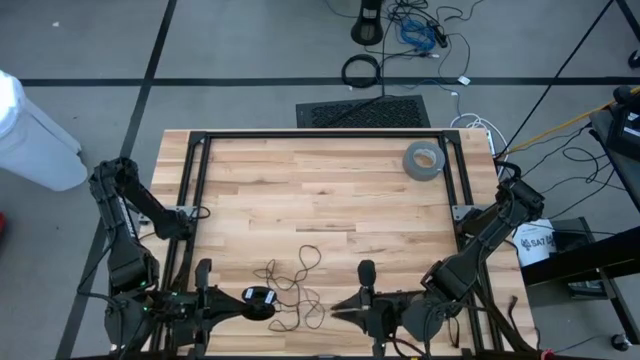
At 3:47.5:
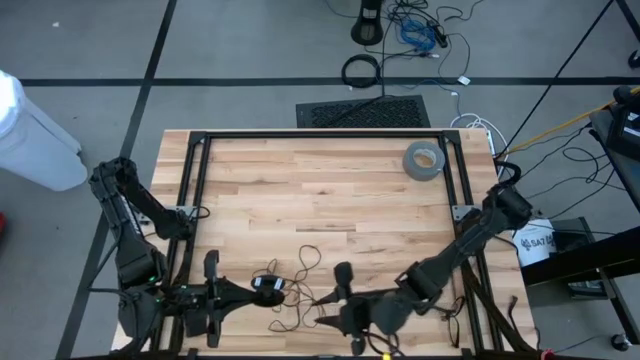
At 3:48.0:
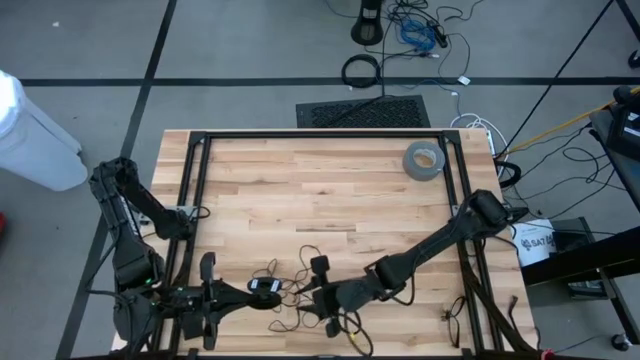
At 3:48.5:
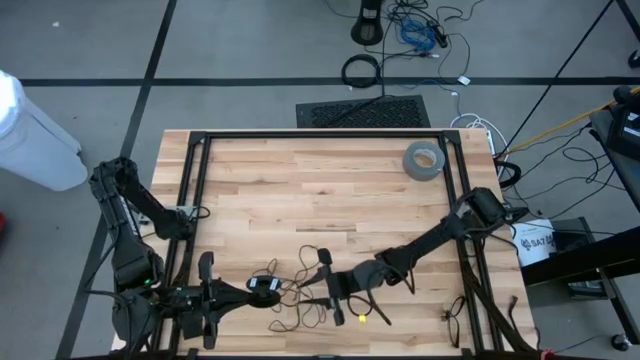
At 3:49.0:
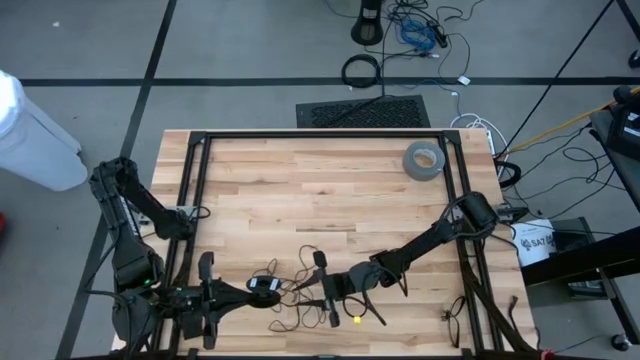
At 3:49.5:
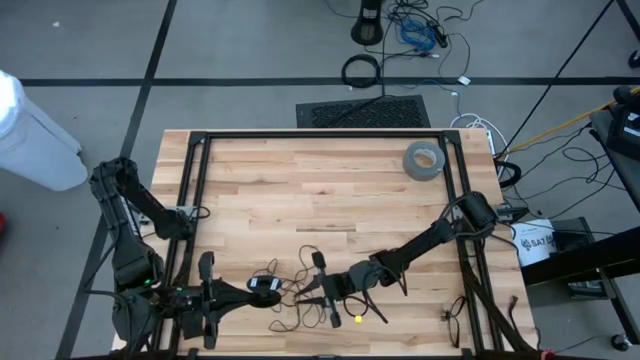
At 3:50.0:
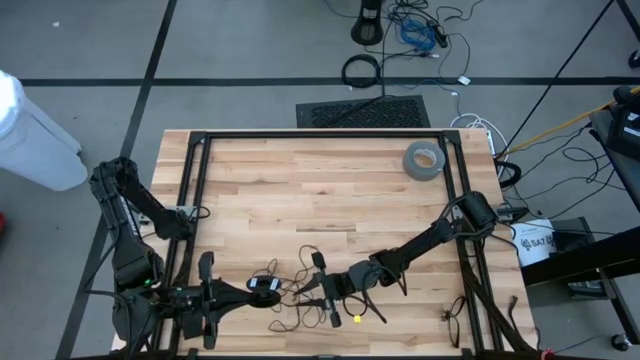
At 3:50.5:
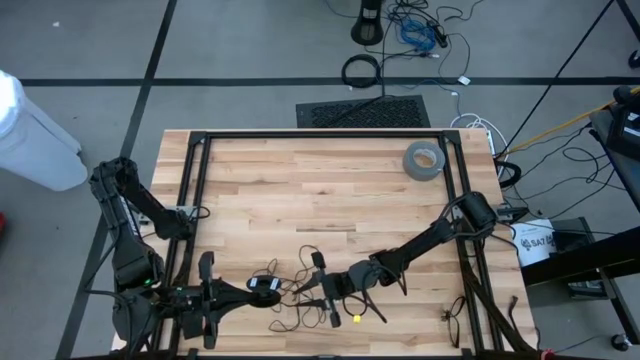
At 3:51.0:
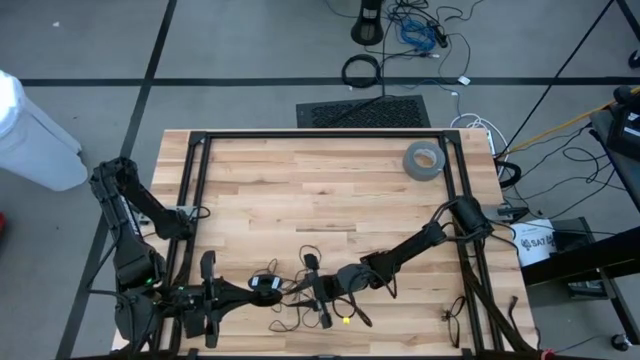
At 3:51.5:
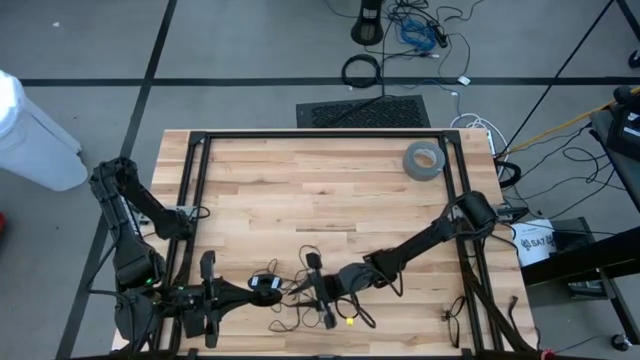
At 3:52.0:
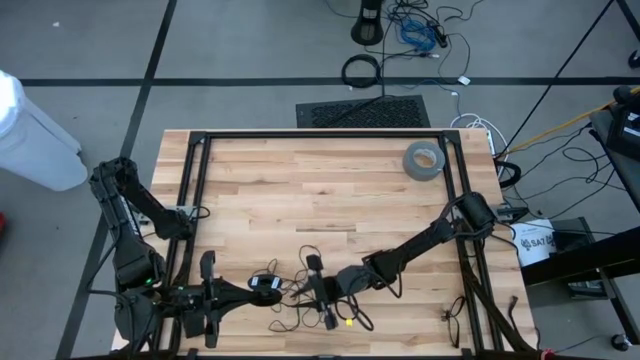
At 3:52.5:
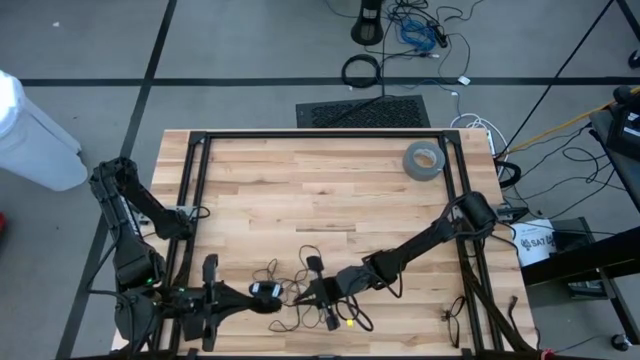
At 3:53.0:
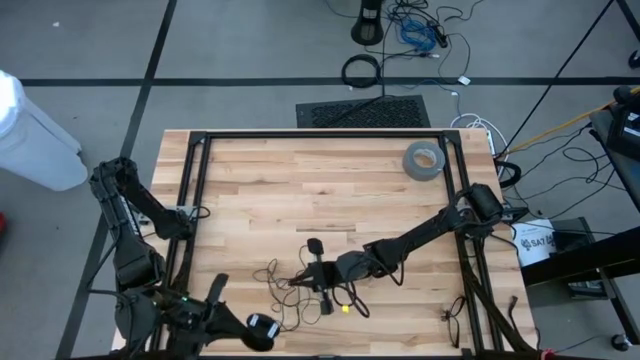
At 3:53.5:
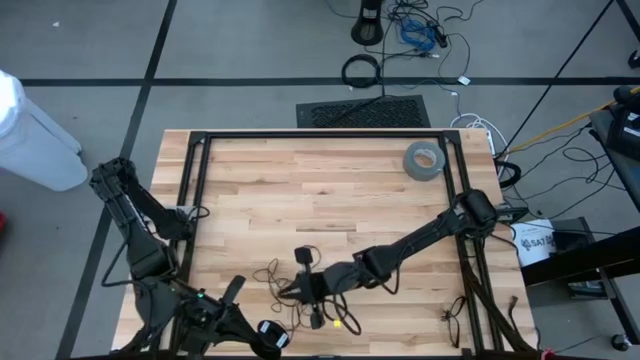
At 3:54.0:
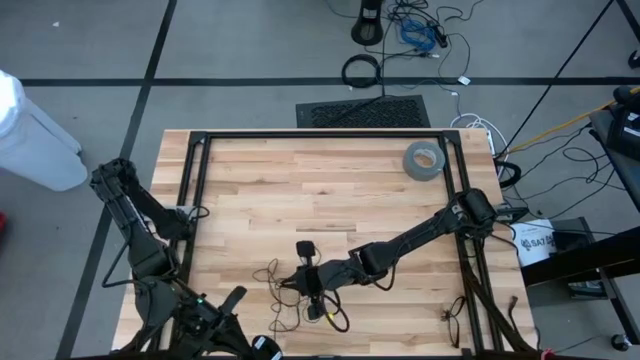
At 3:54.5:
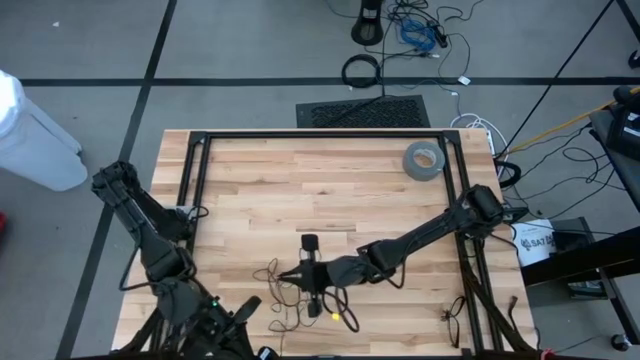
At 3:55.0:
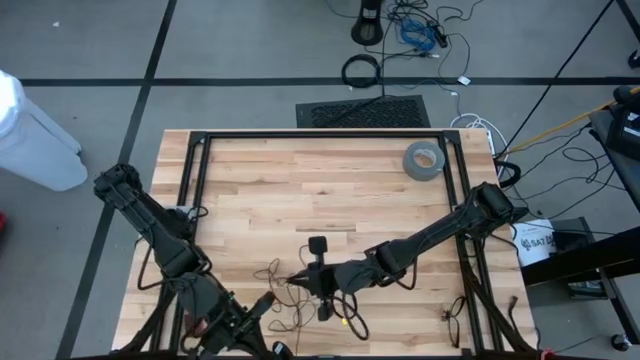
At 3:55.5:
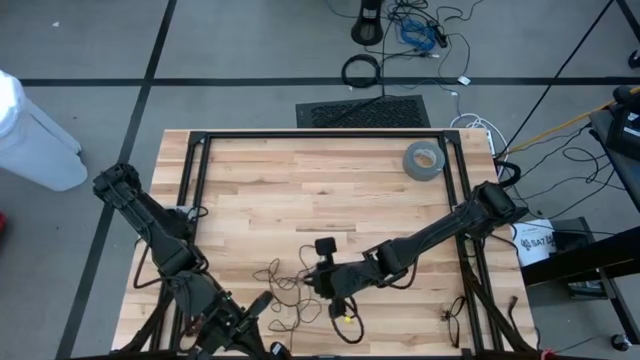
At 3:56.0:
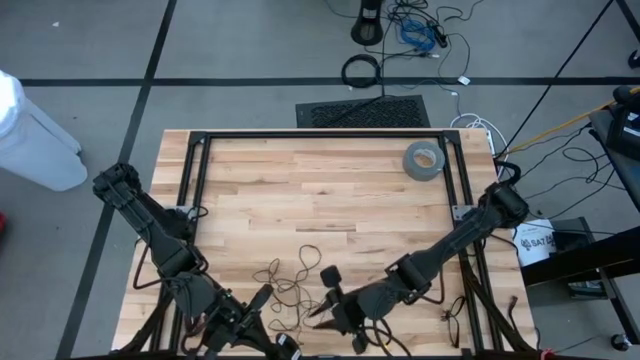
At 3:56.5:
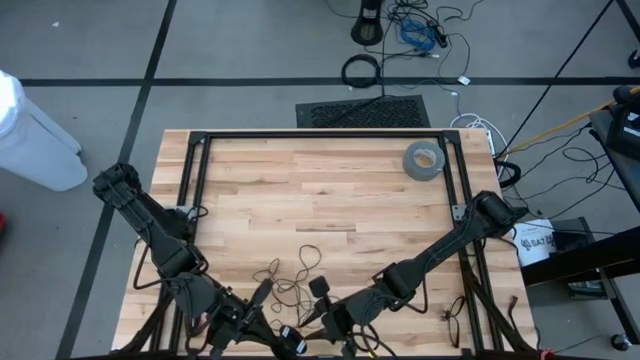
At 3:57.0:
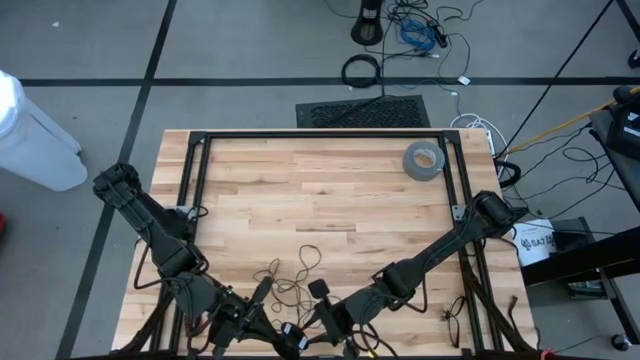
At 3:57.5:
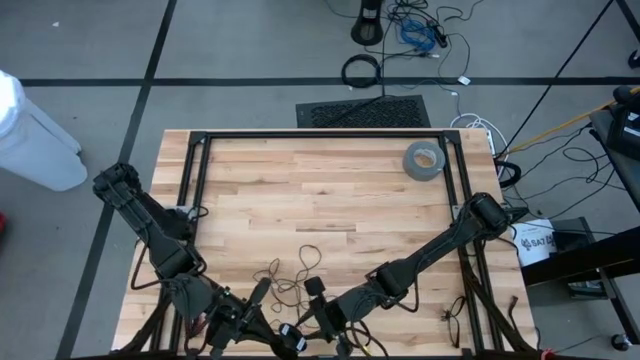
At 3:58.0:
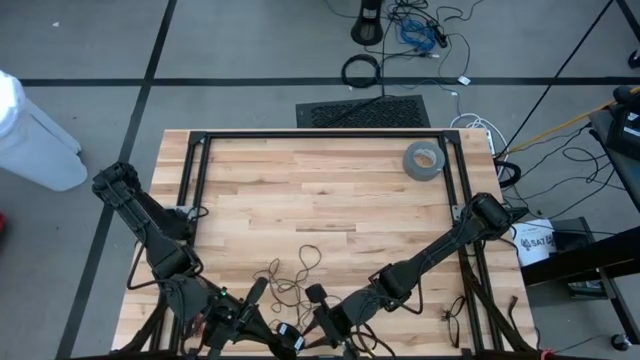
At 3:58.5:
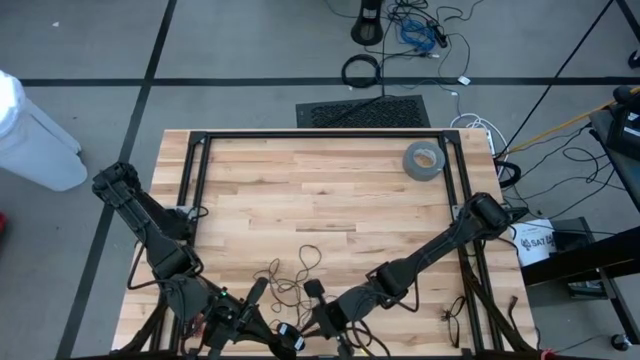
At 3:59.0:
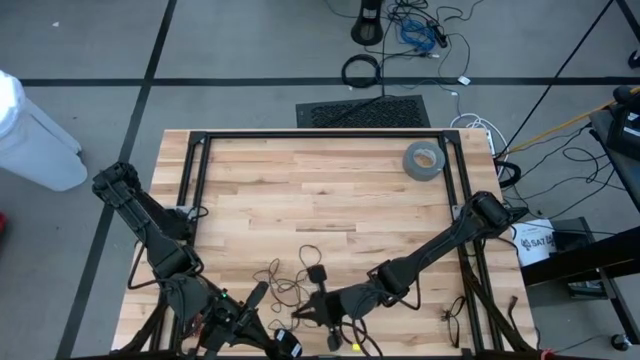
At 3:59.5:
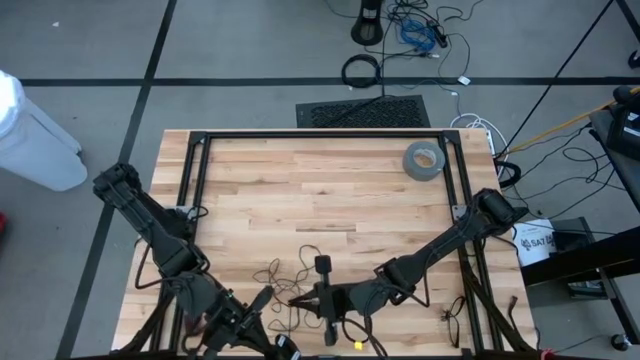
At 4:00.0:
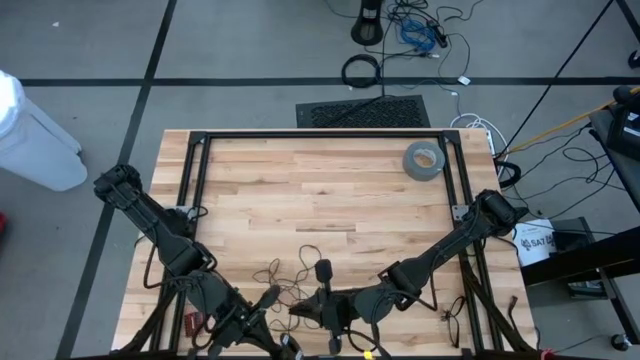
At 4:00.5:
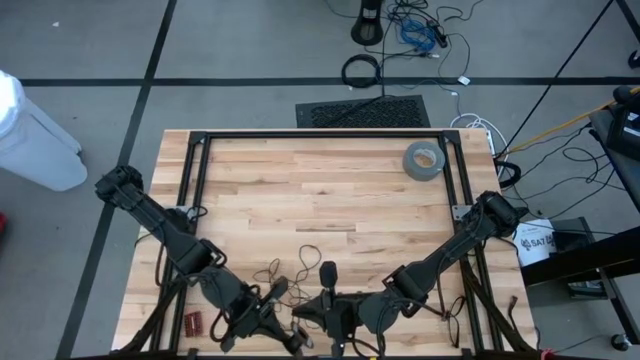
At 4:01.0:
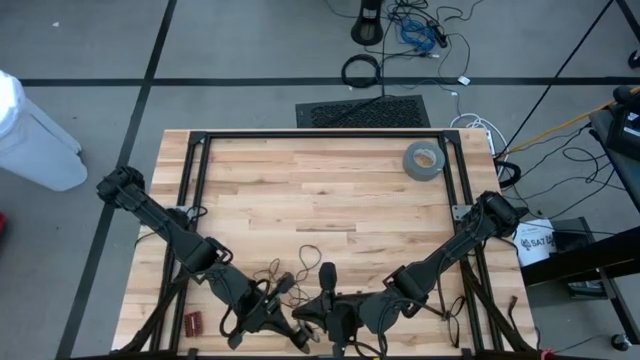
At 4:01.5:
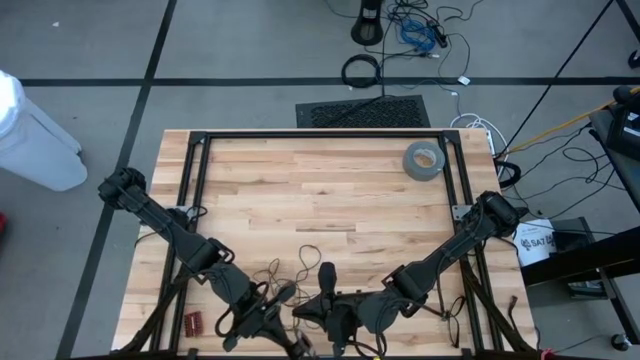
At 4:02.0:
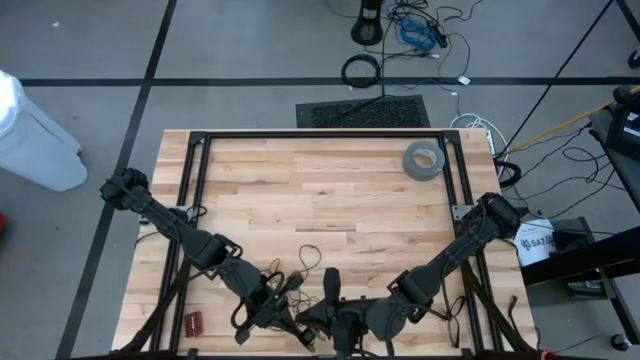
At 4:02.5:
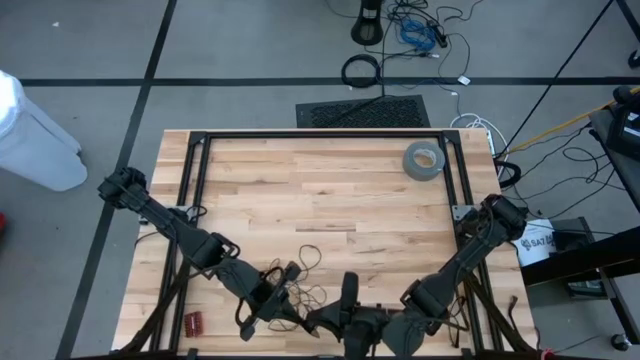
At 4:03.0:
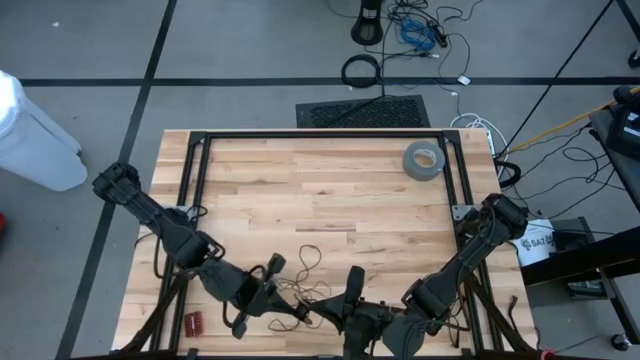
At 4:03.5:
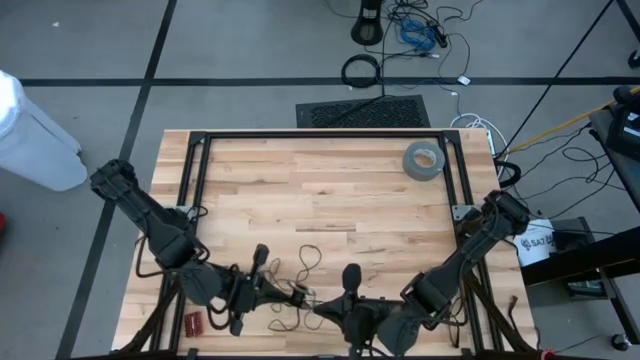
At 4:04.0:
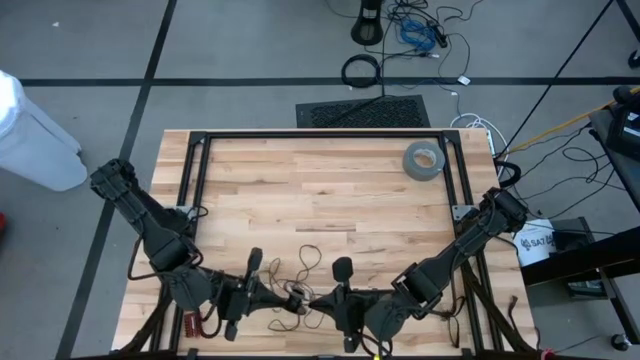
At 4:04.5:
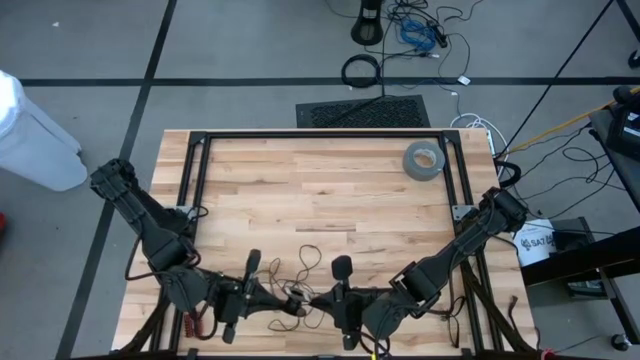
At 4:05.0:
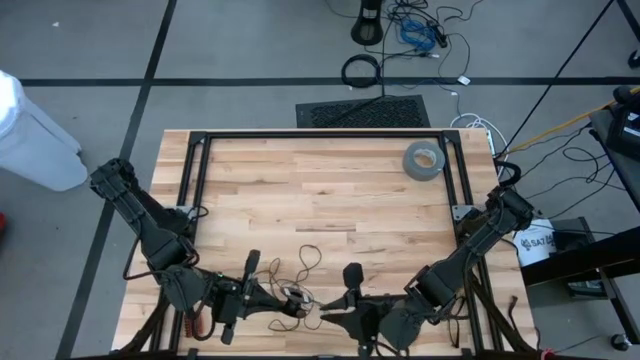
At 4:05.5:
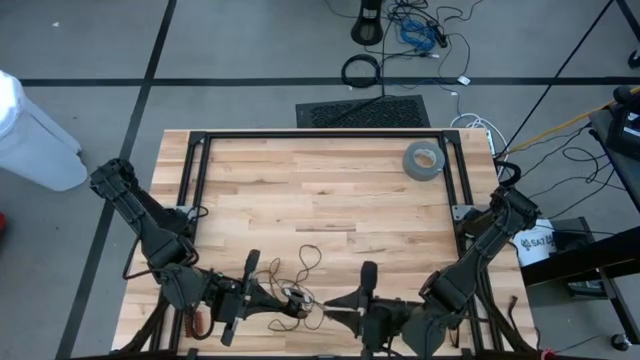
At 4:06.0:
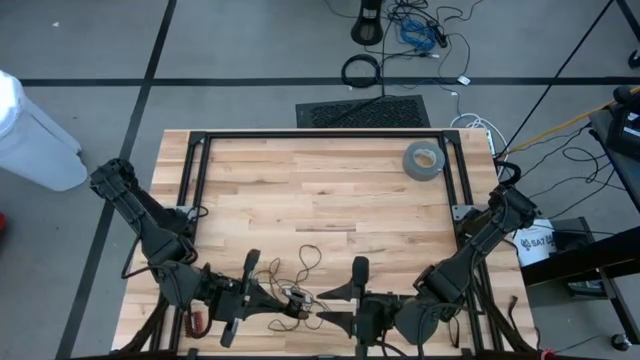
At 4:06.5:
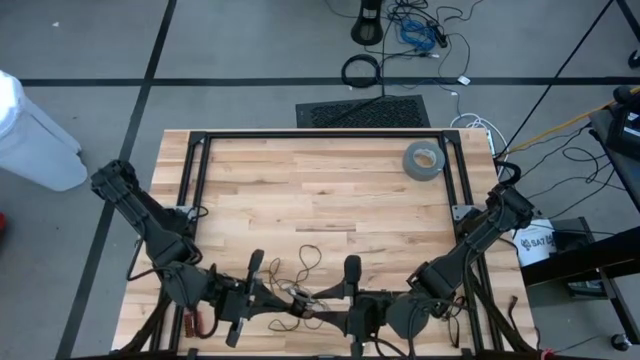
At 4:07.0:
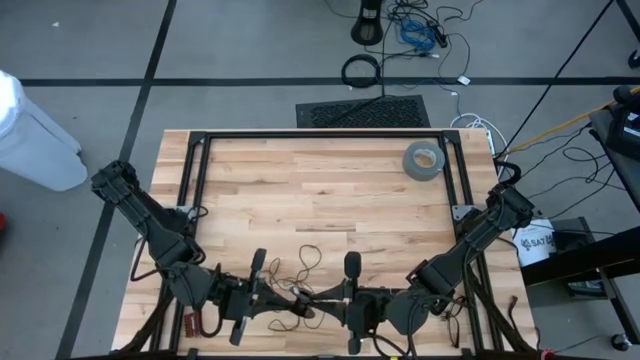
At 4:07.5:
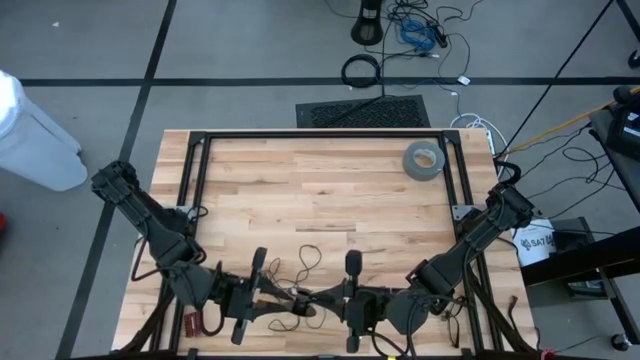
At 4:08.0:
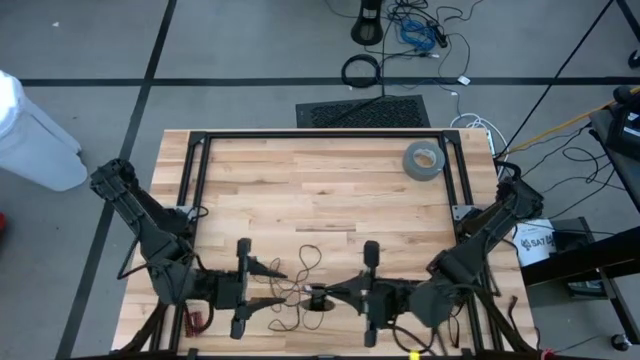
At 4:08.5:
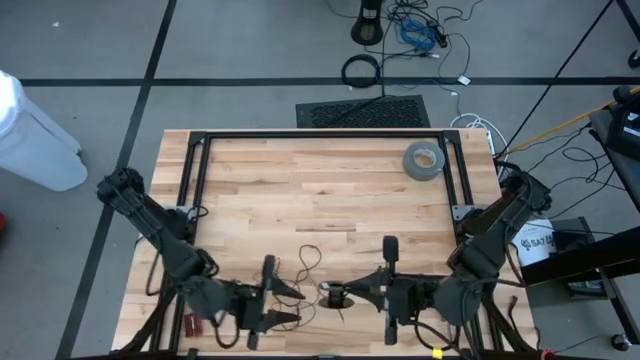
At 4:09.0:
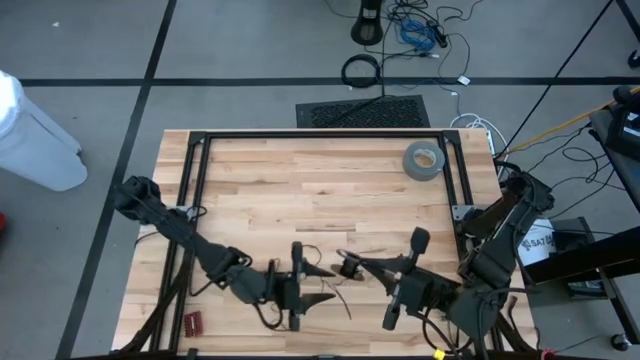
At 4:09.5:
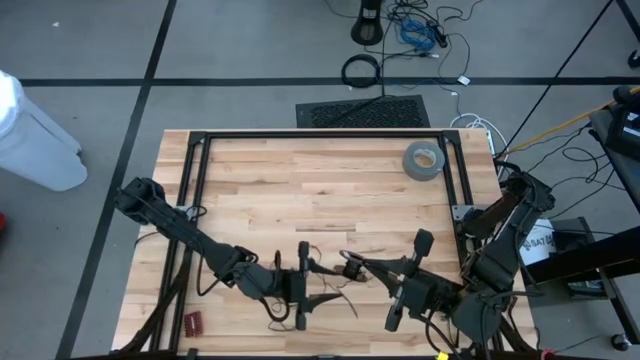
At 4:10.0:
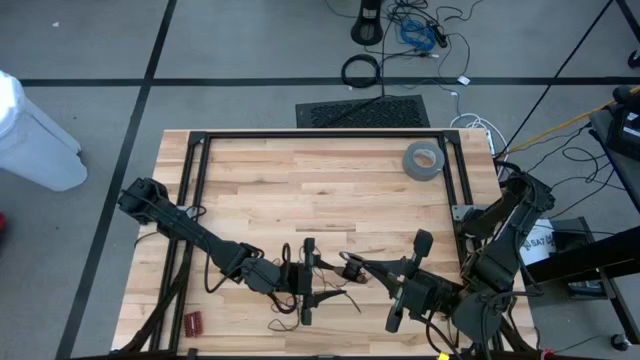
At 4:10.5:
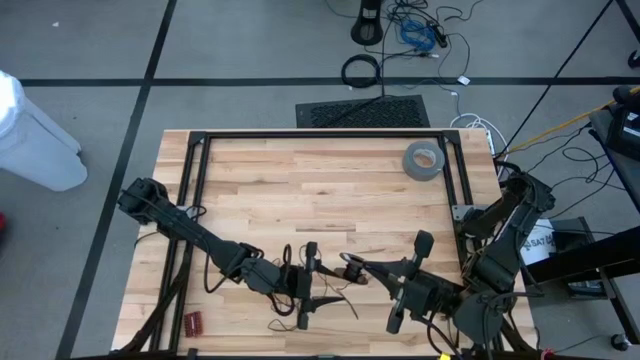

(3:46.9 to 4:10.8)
Task: Coil cords
Coil the black wire onto the spool
